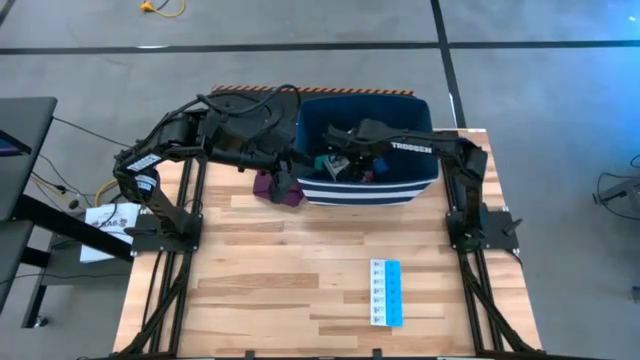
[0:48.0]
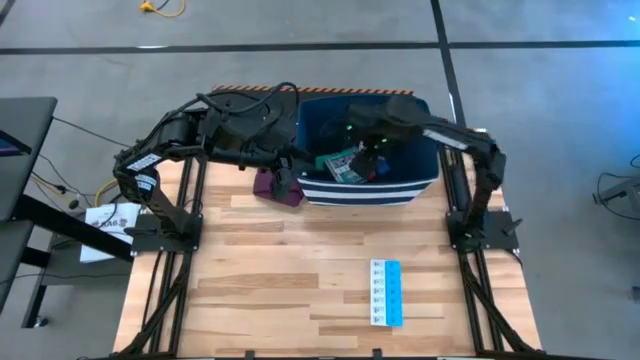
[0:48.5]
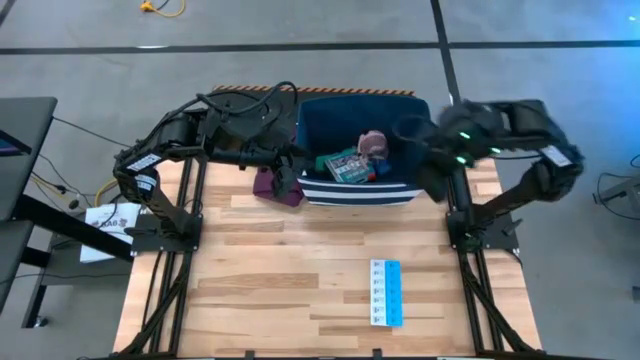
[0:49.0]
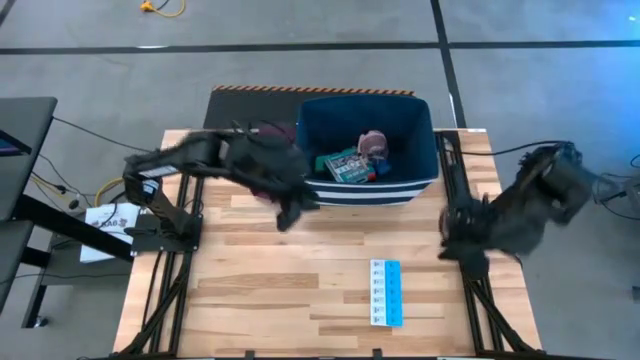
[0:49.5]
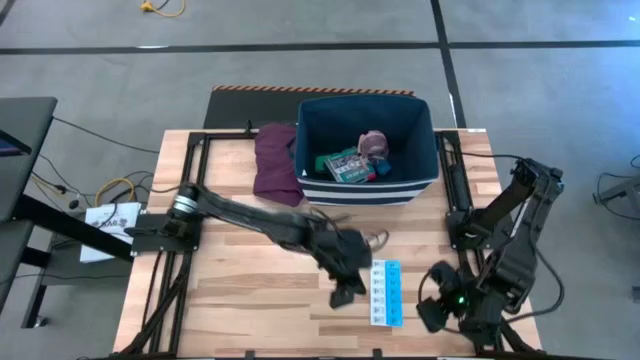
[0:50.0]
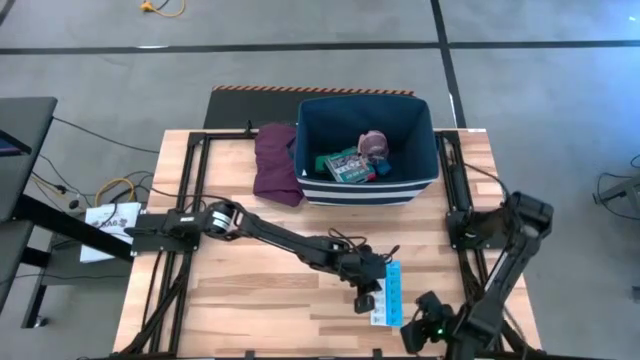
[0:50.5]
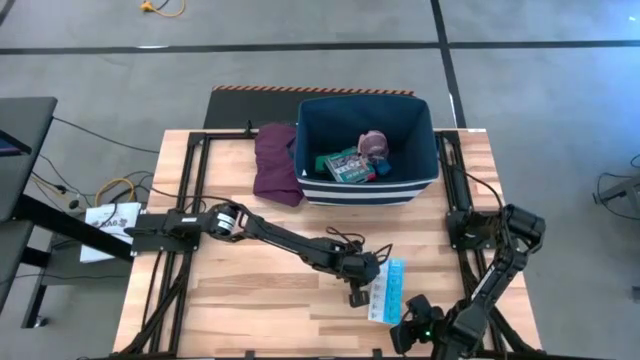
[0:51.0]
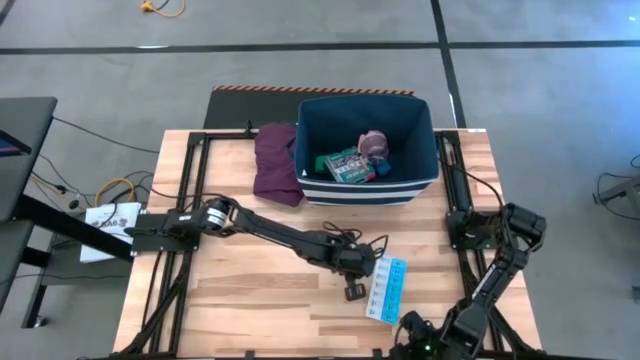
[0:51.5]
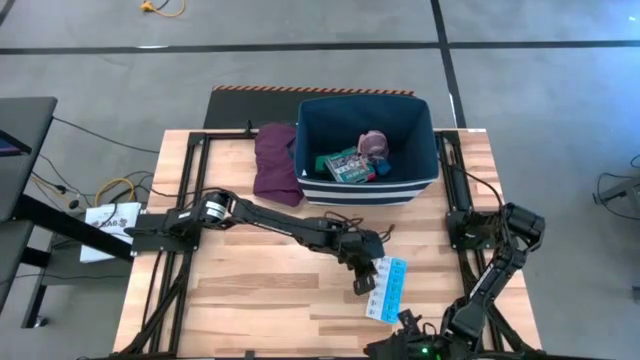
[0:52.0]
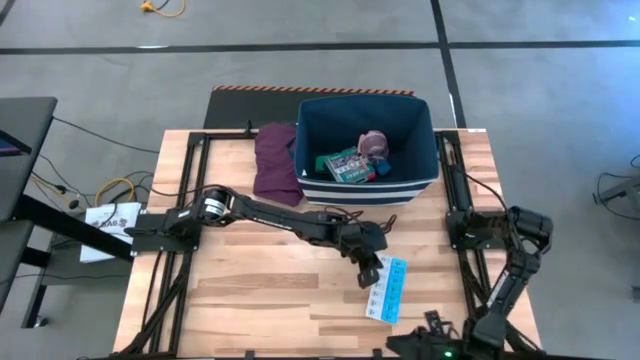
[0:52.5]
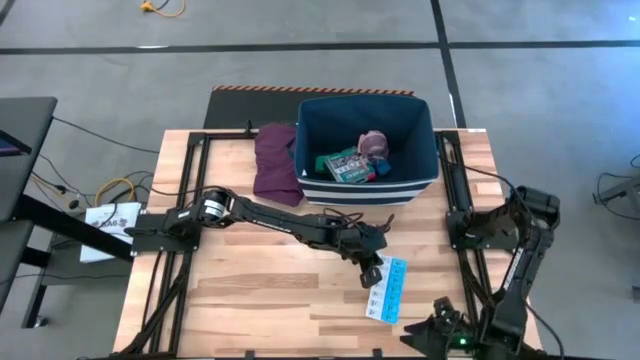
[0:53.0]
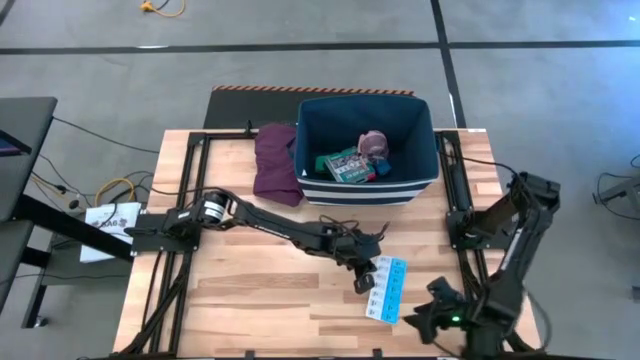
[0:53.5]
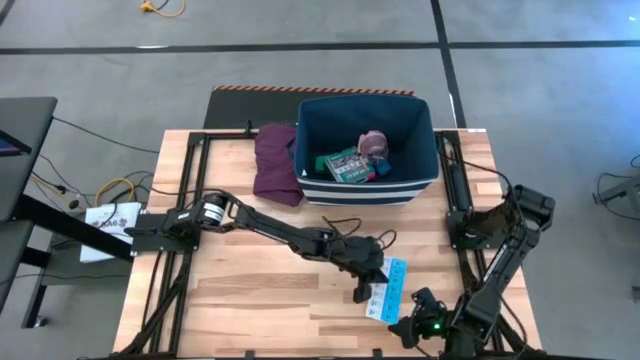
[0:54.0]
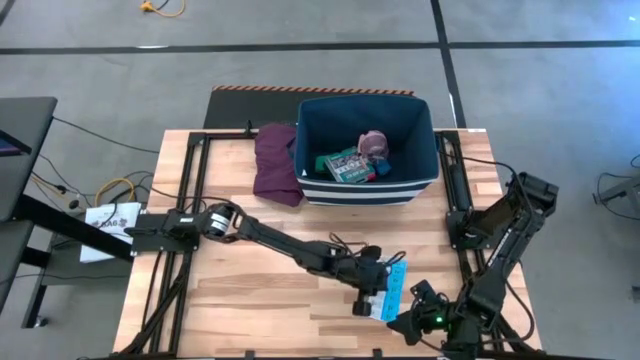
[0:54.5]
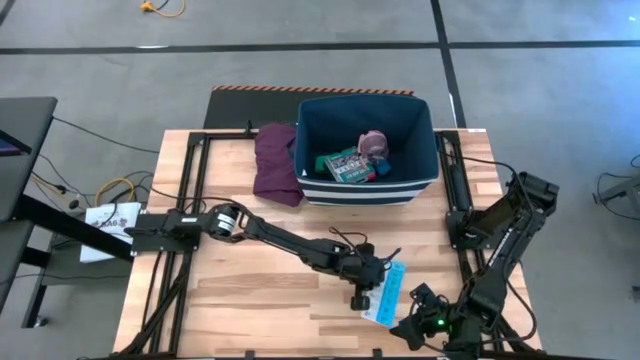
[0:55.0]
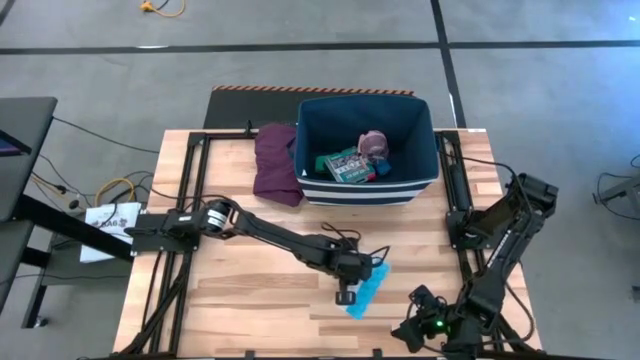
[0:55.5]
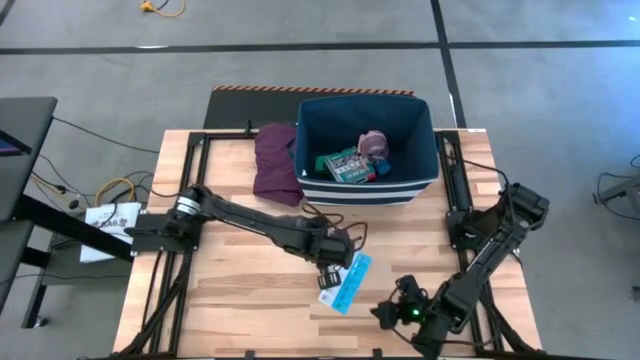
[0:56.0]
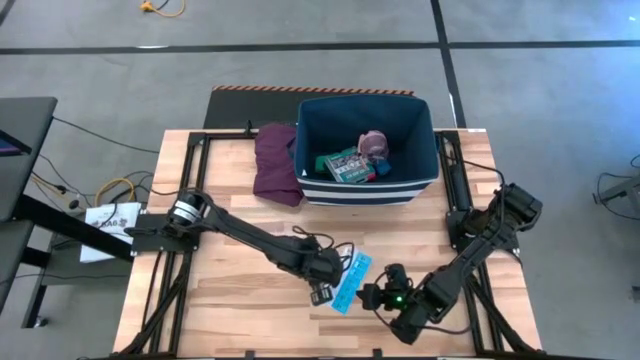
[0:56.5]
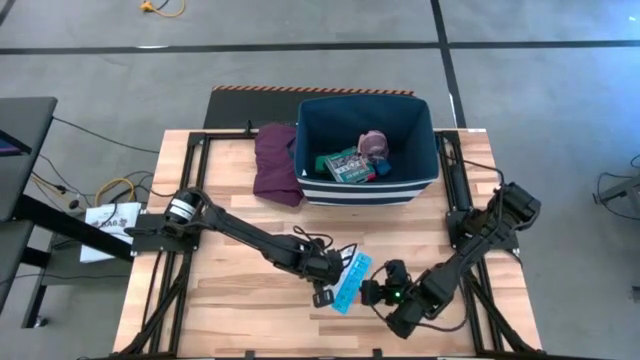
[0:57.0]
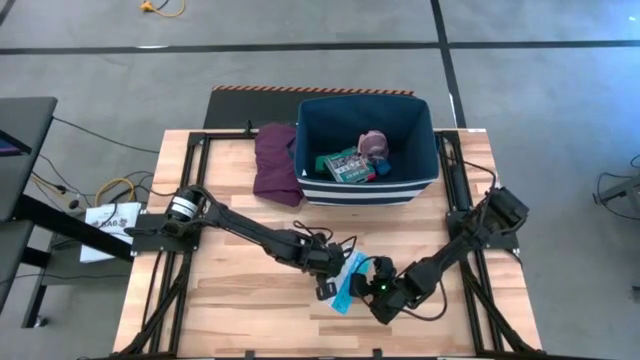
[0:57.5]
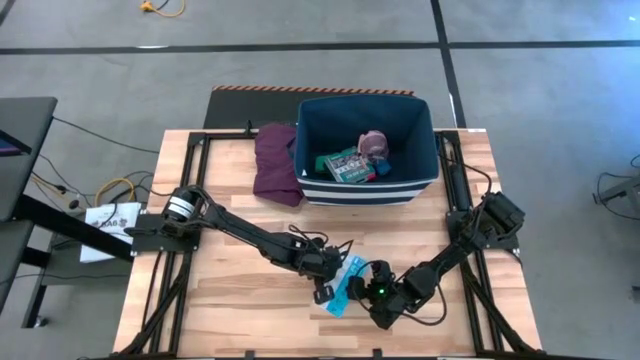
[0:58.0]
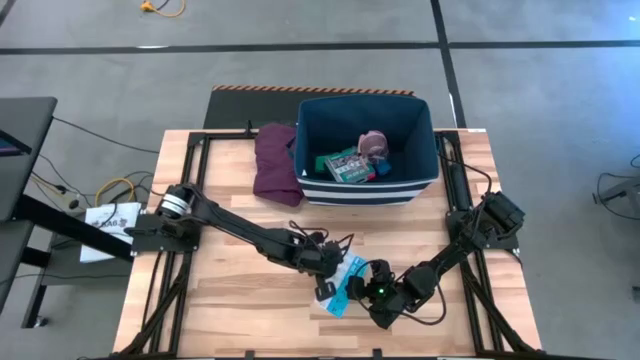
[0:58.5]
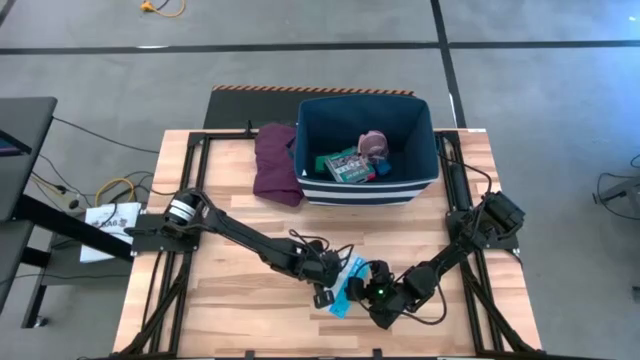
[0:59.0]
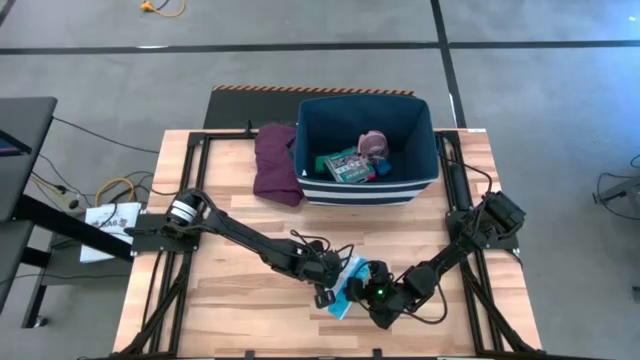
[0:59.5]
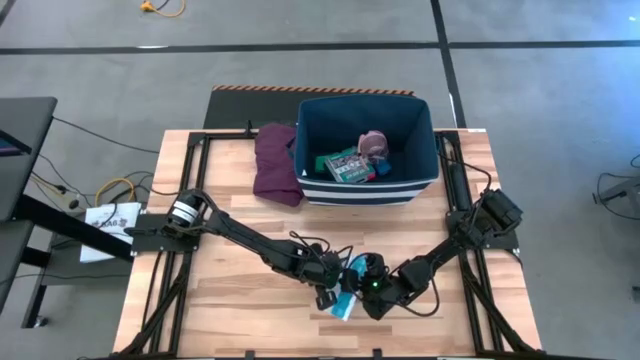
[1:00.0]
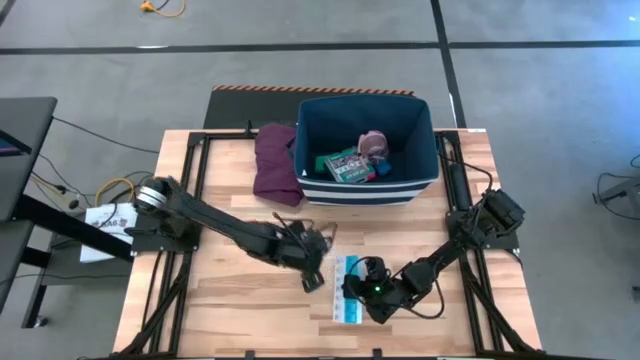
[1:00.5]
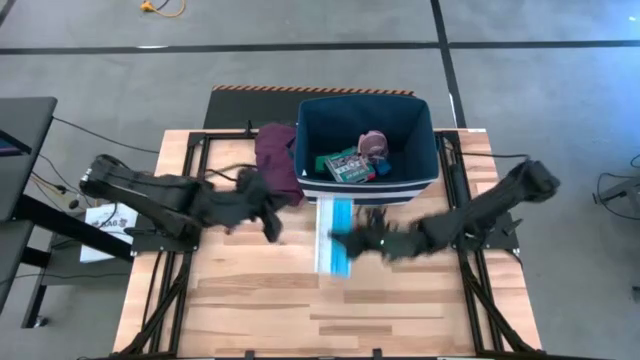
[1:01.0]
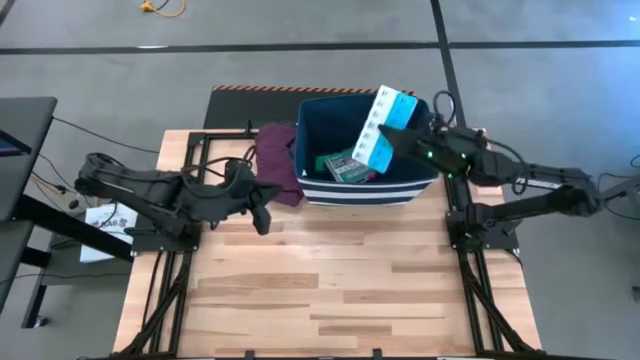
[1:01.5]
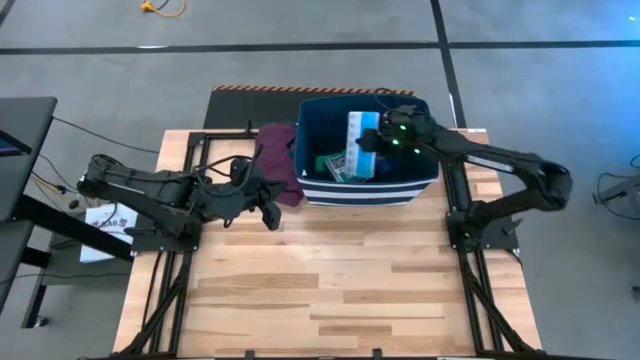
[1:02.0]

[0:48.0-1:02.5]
Task: Pick & place medical supplies in basket/bin
Put the white and blue medicine organizer into the blue organizer

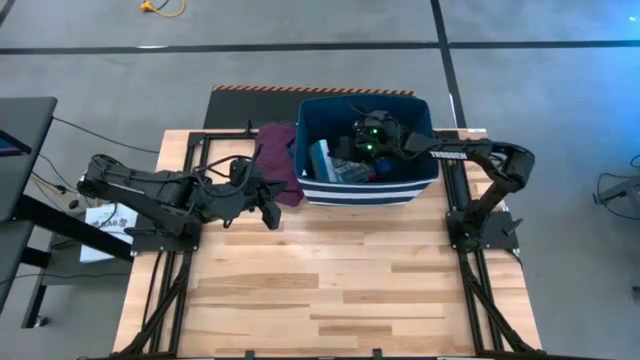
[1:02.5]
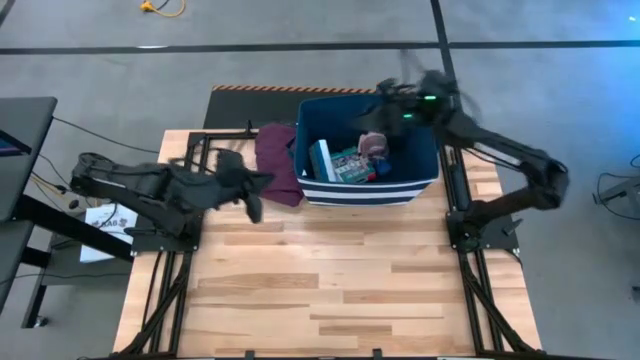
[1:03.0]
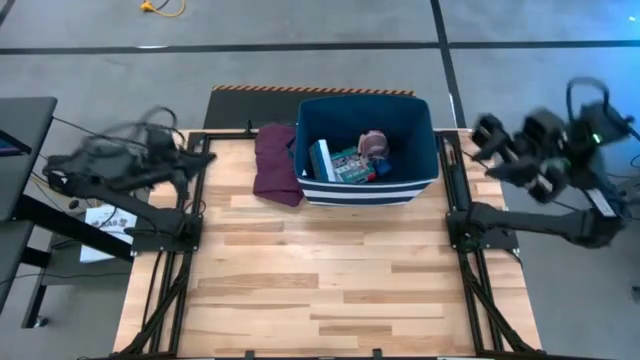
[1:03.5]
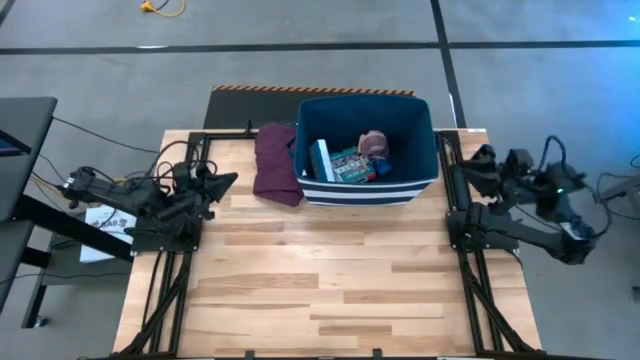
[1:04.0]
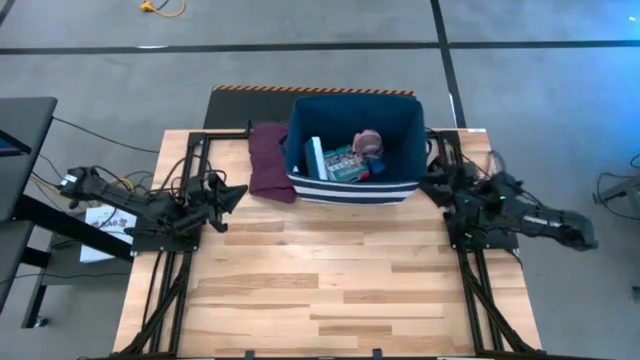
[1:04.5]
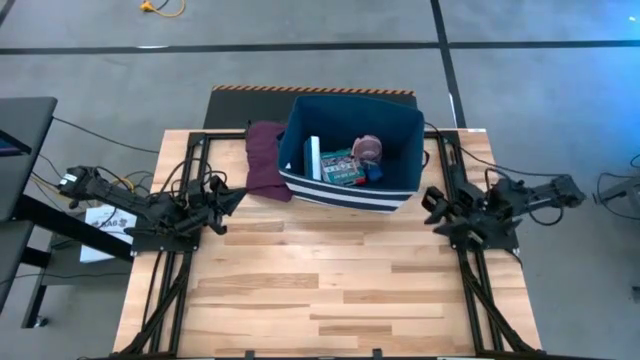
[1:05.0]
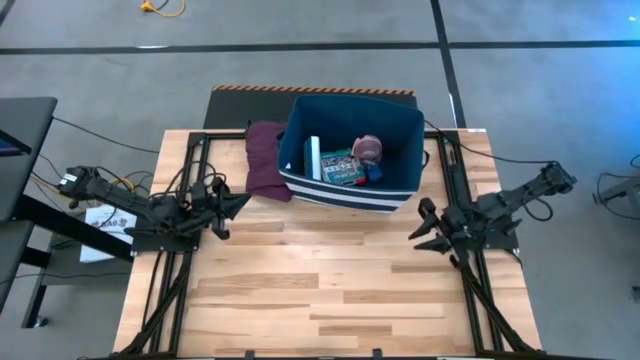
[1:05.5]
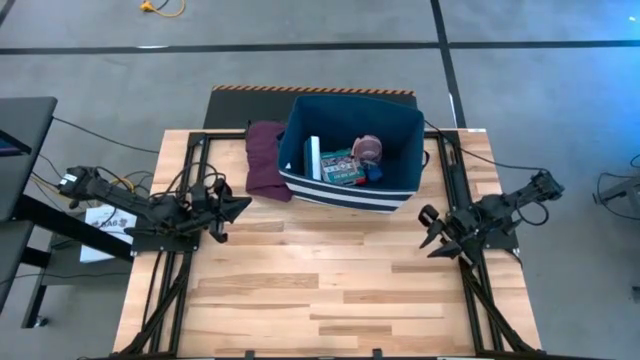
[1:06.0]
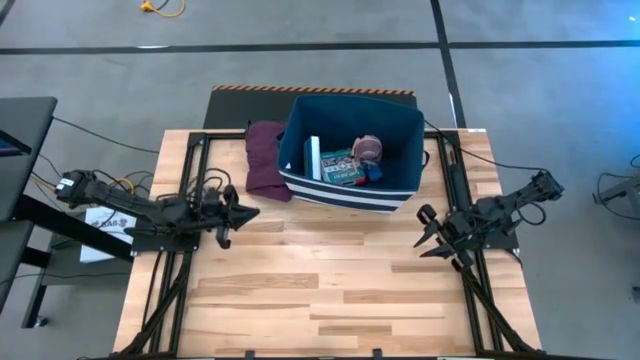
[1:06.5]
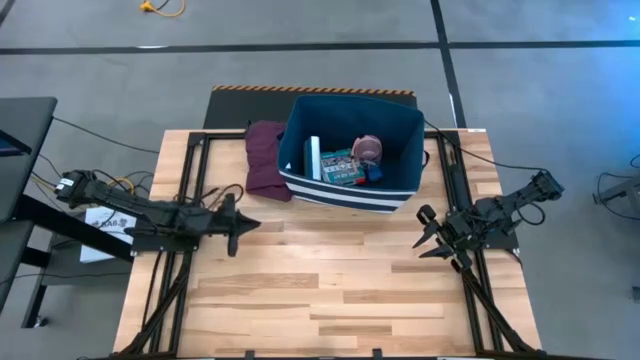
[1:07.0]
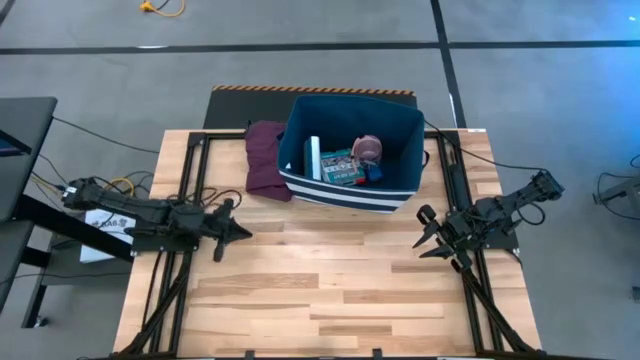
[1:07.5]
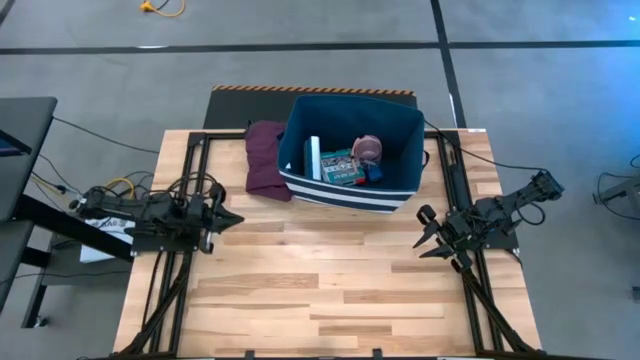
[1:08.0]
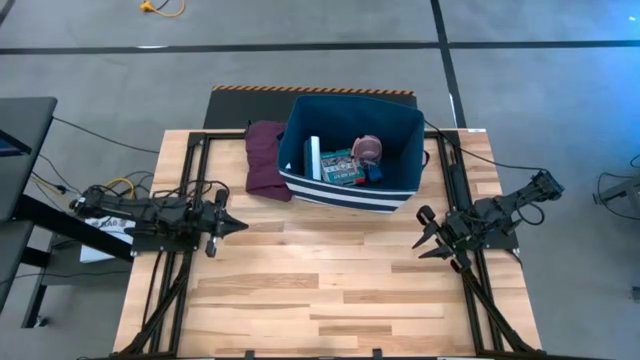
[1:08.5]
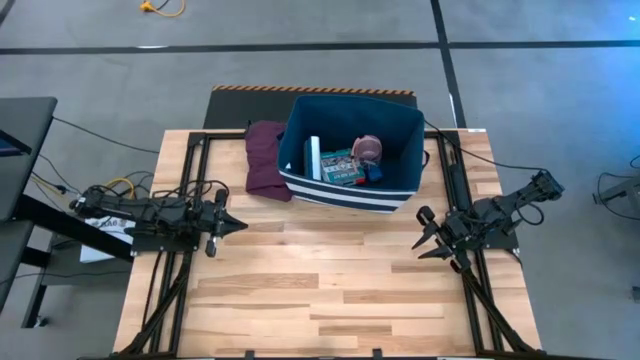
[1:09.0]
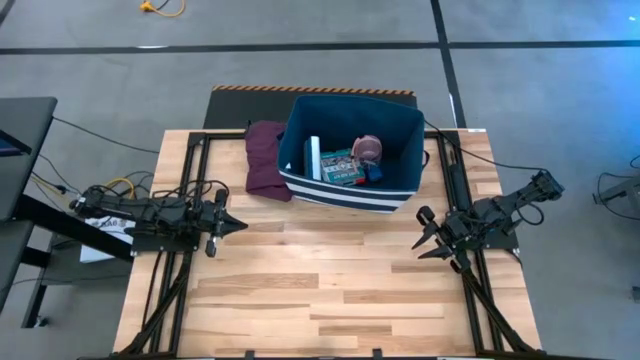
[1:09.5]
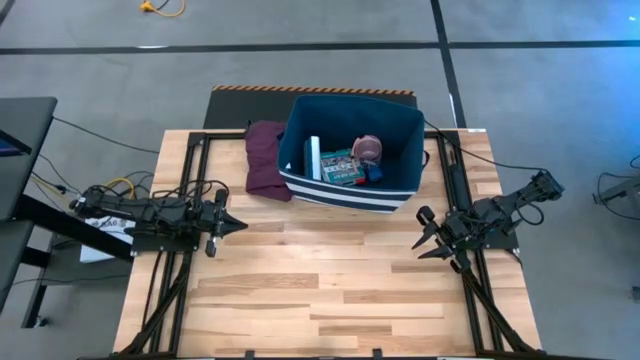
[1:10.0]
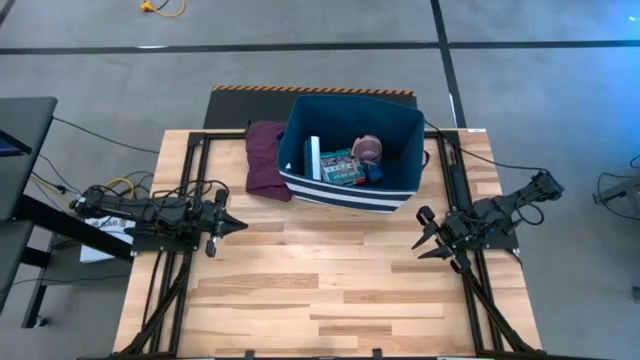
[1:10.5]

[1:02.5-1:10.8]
Return to Home Position
